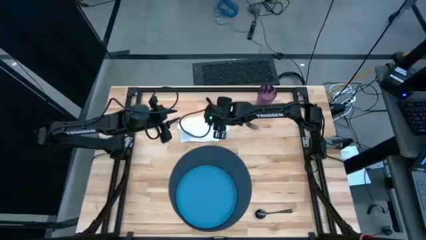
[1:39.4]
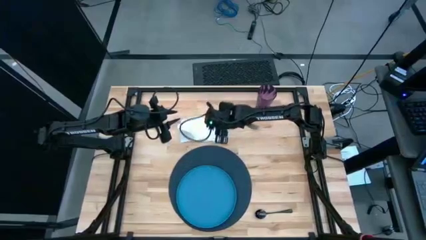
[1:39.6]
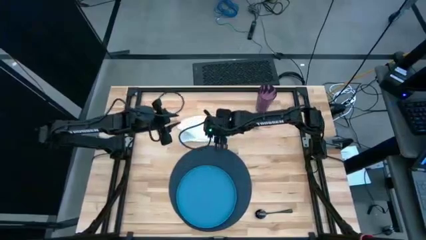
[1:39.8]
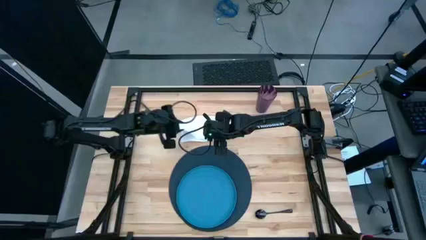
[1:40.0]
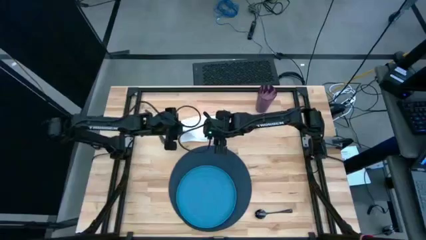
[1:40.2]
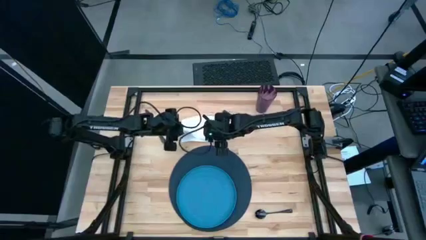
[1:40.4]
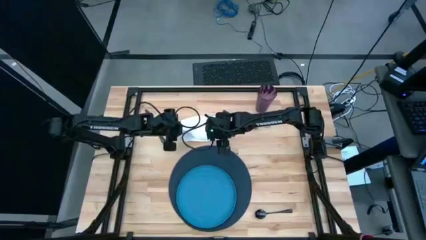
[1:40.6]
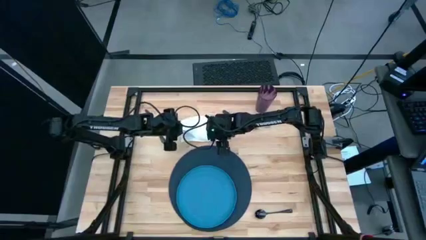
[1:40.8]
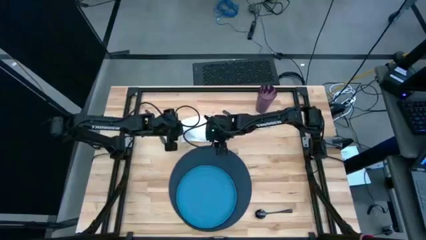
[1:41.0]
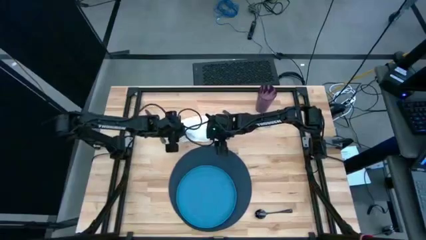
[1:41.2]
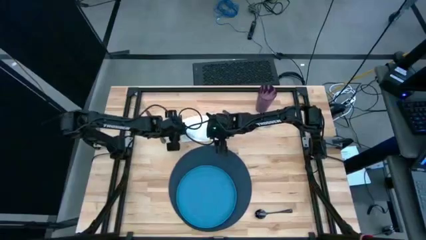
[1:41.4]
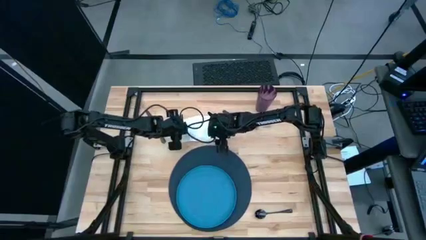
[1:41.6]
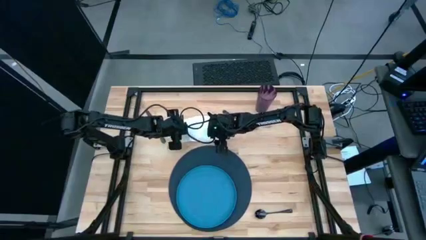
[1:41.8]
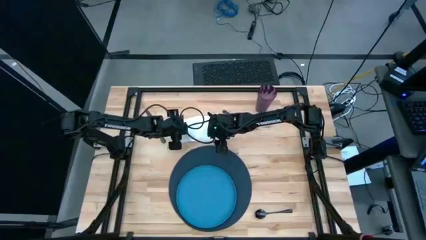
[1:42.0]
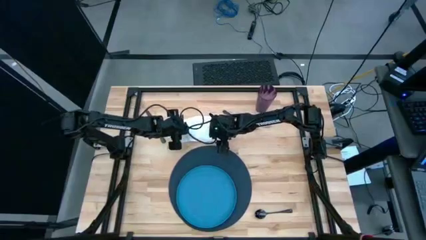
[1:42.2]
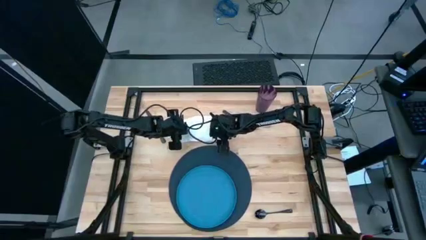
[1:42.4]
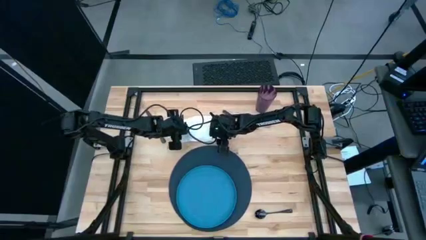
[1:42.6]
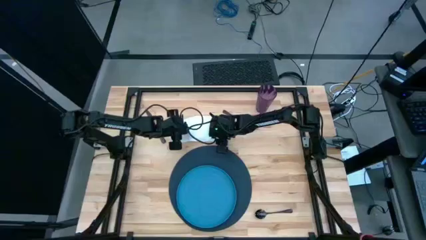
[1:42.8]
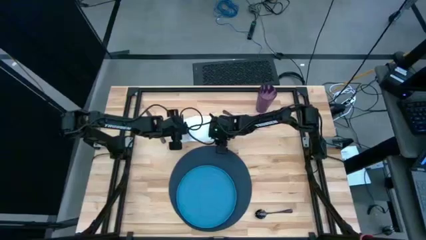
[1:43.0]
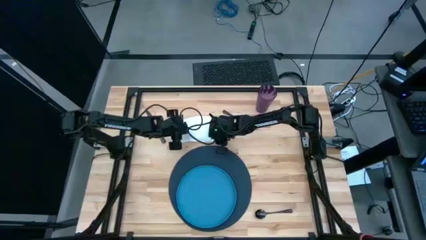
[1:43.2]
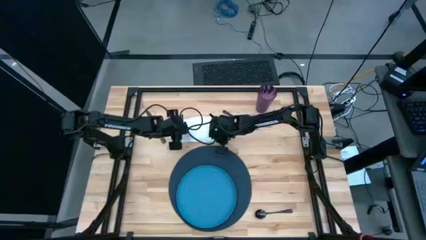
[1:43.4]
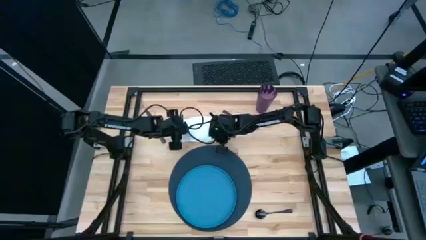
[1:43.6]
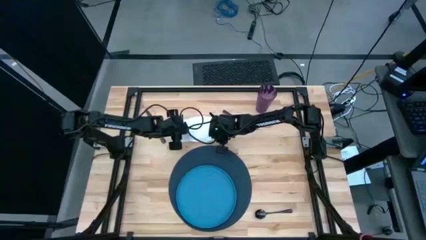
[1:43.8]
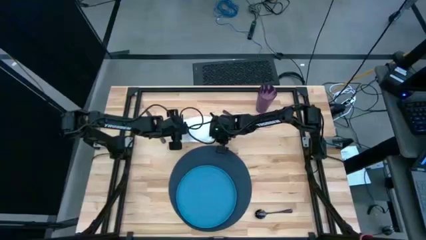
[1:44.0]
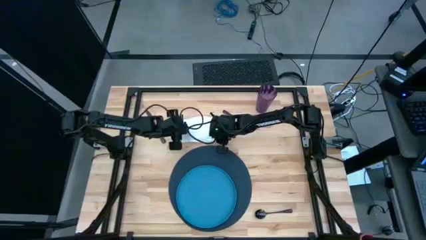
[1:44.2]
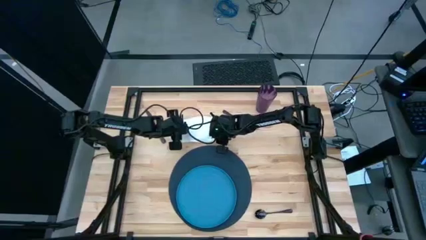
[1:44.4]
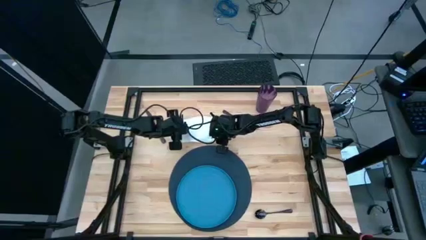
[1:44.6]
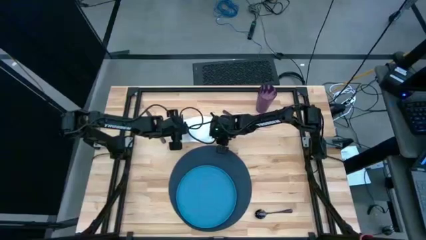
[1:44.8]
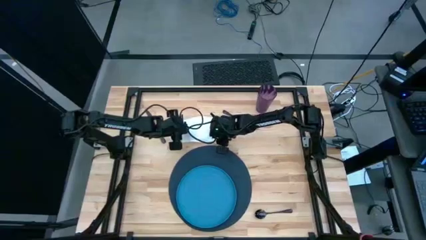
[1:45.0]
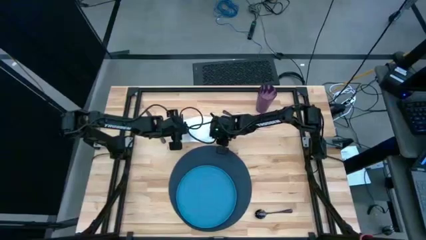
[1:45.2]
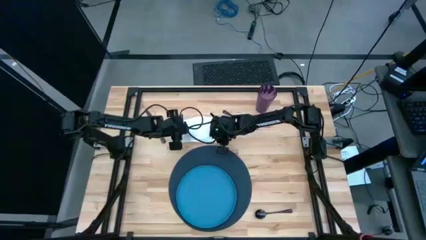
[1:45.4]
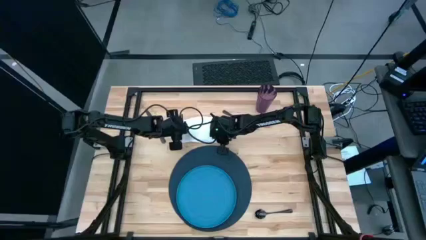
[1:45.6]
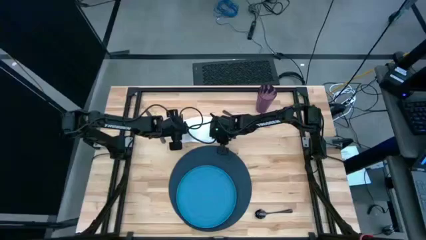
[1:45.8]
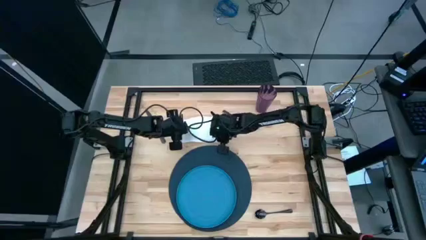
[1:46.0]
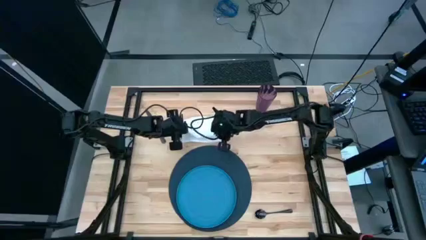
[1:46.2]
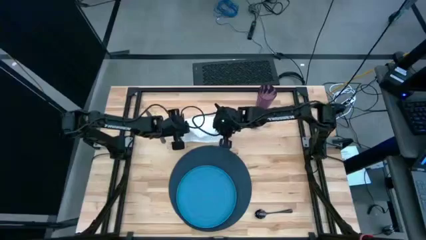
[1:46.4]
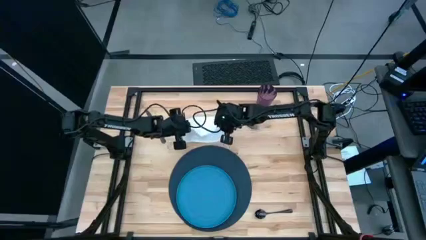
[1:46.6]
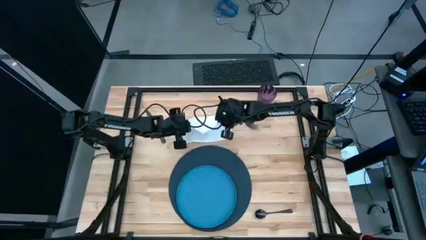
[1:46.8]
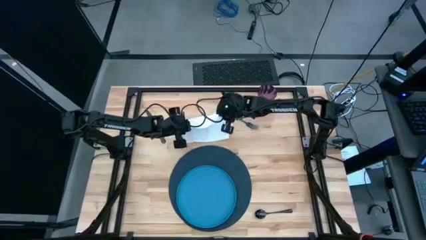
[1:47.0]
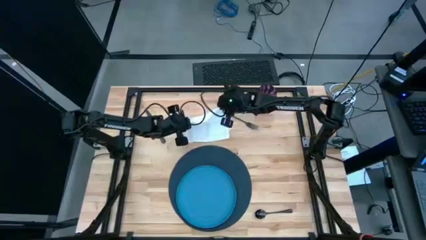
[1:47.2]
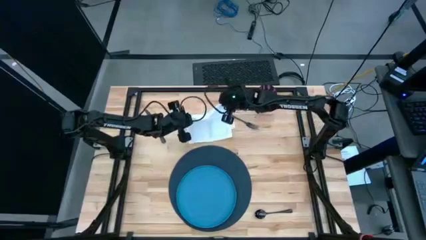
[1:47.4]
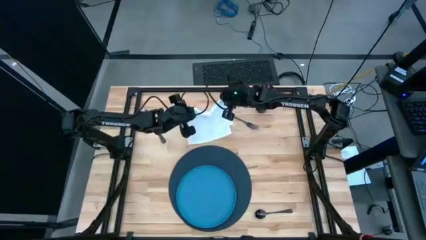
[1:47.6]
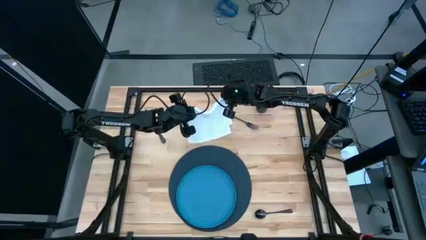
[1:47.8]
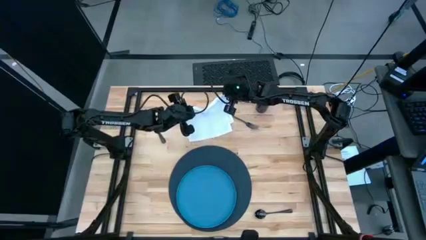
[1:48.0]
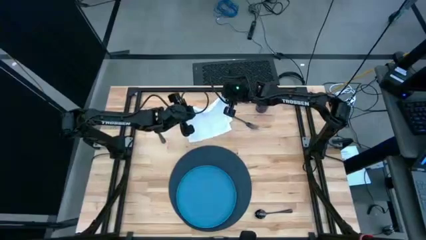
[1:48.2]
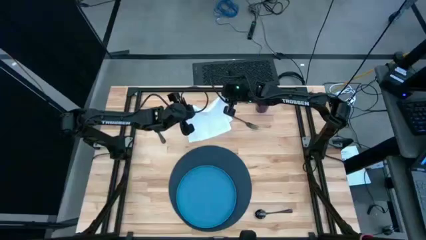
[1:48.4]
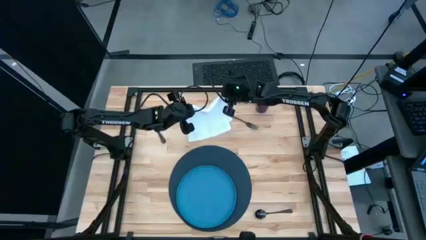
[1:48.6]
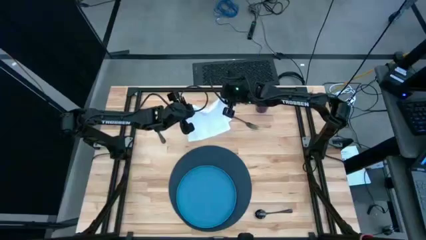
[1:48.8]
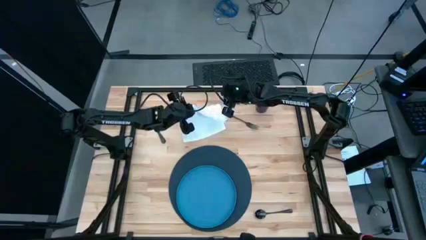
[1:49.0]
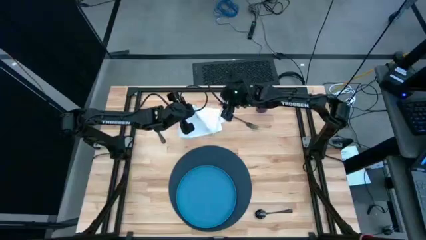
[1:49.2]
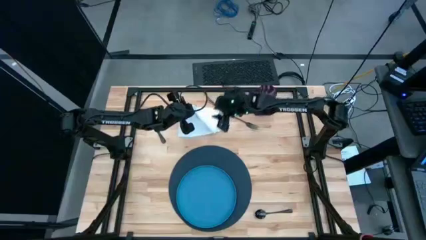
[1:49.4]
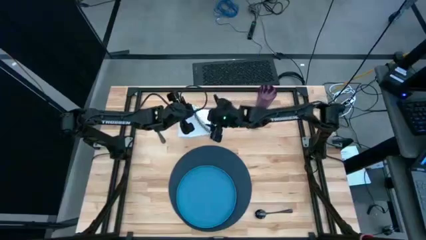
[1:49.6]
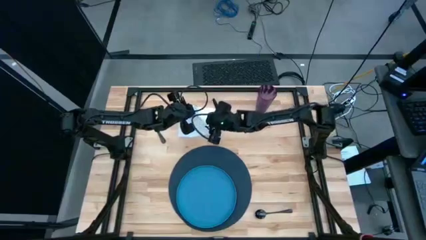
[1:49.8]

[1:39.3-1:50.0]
Task: Set table place
Fold the white napkin

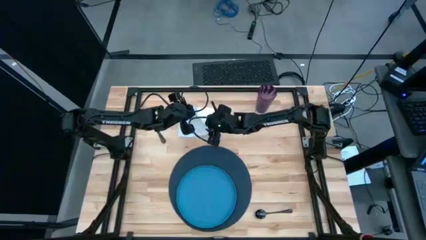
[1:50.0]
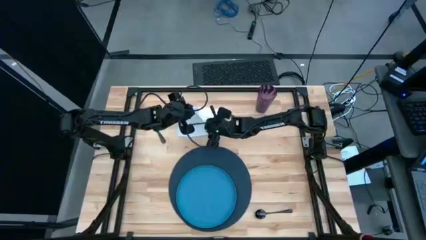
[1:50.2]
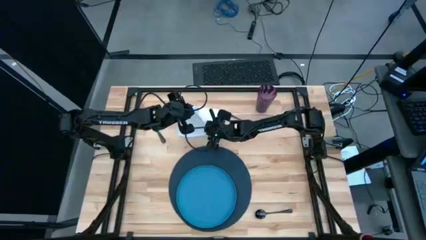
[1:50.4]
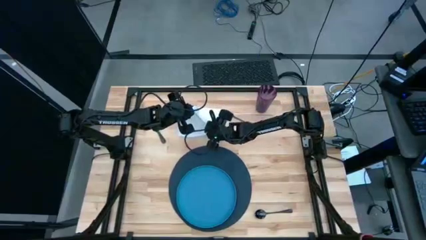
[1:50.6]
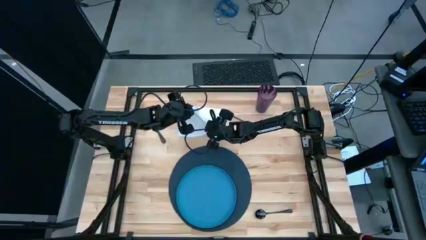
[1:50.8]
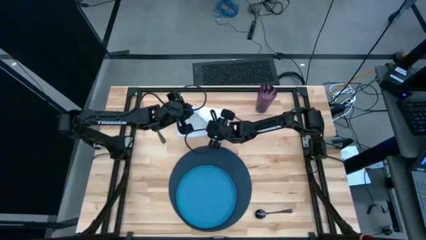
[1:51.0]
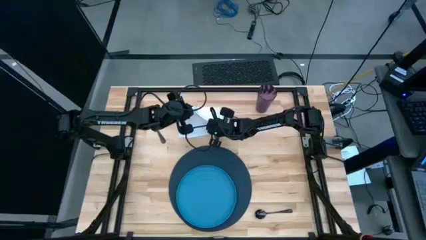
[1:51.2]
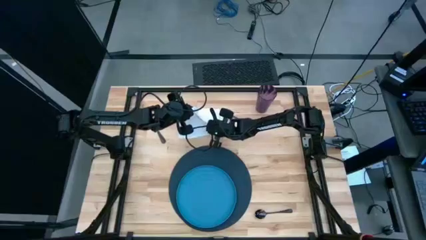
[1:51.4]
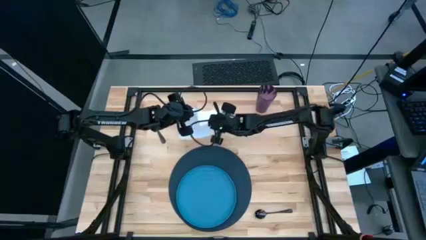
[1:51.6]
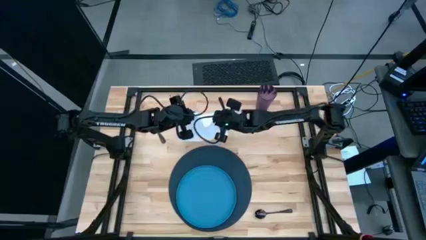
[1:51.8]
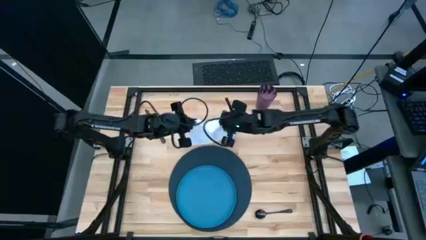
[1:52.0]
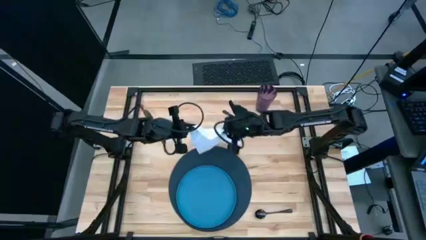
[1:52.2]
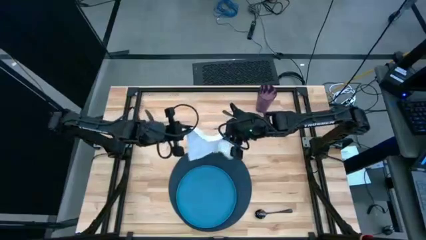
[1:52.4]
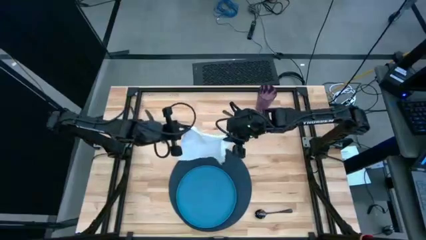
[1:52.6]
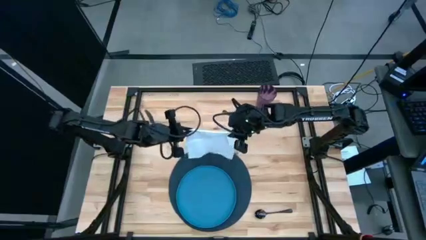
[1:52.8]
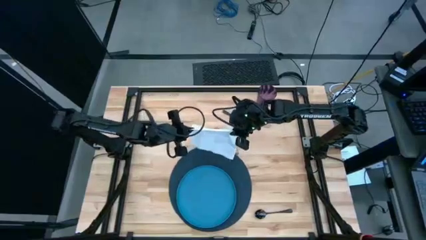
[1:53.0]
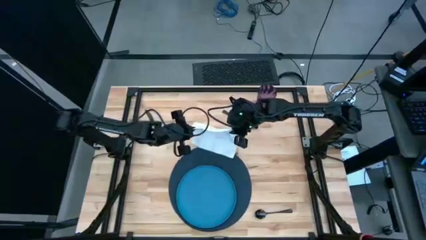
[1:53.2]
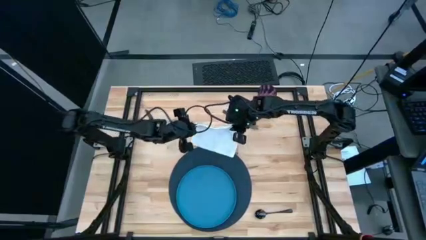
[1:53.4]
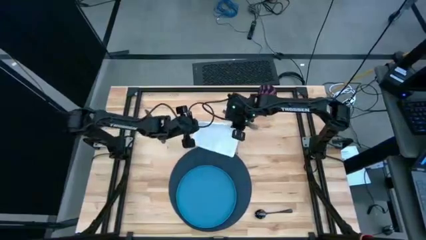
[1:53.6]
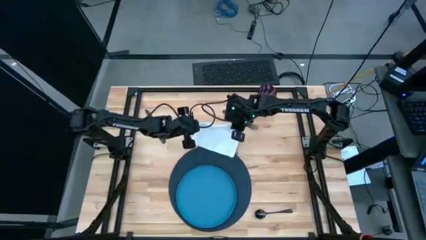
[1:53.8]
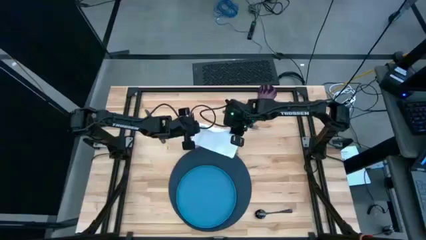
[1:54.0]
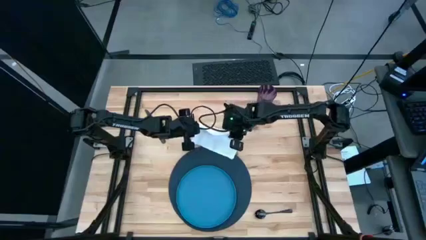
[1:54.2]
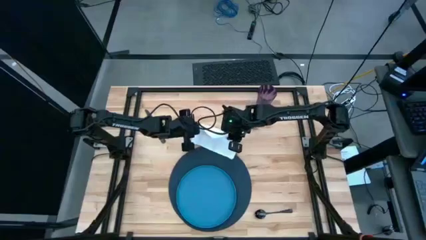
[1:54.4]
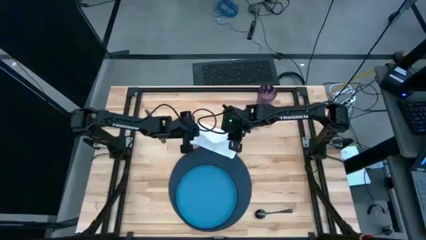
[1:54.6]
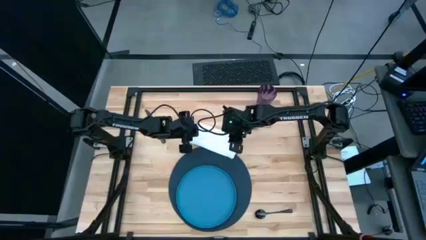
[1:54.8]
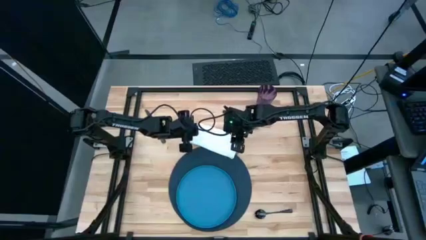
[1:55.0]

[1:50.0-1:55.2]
Fold the white napkin
